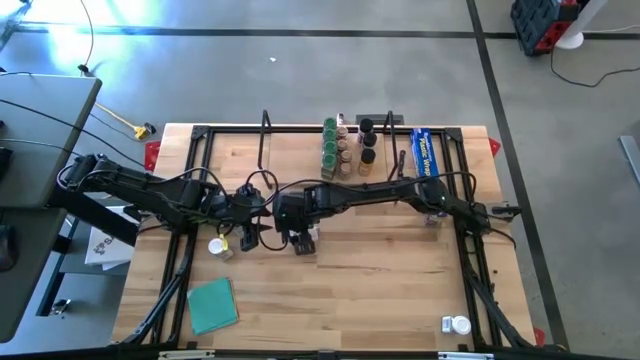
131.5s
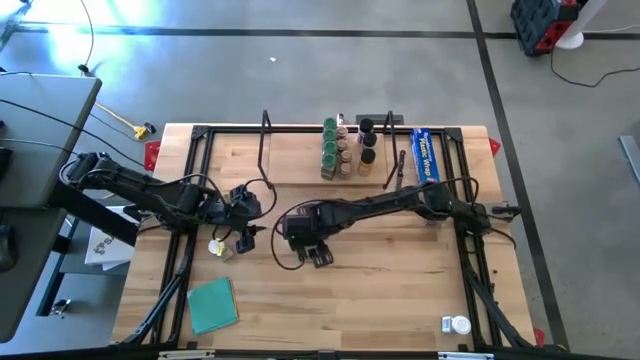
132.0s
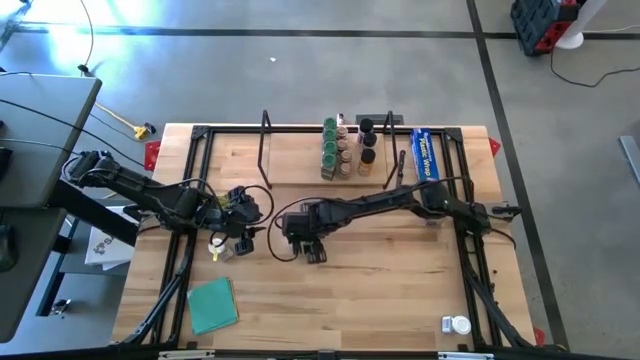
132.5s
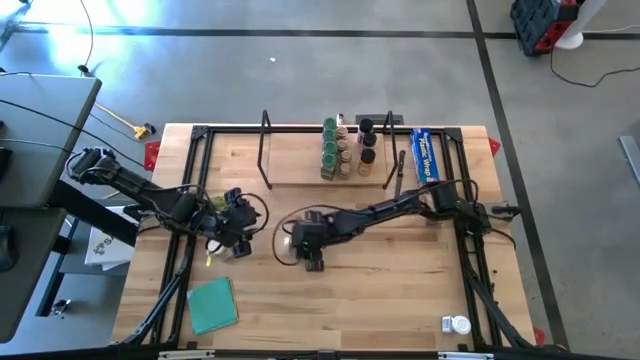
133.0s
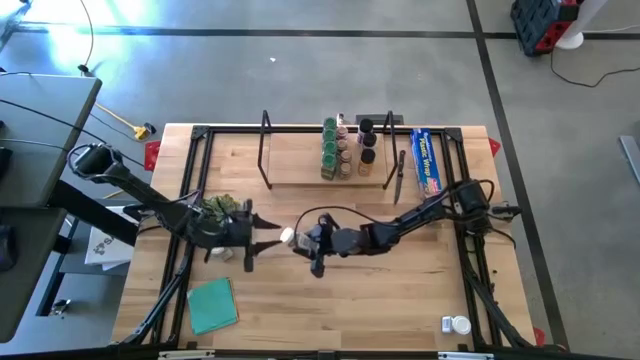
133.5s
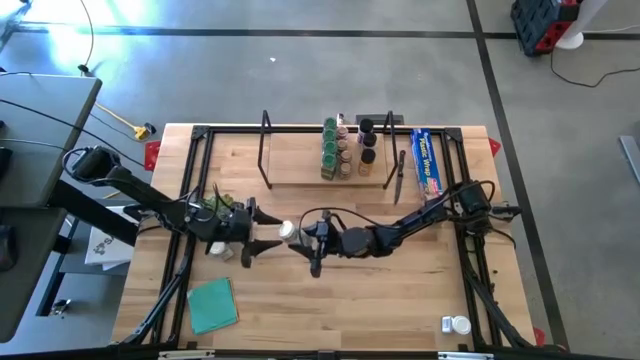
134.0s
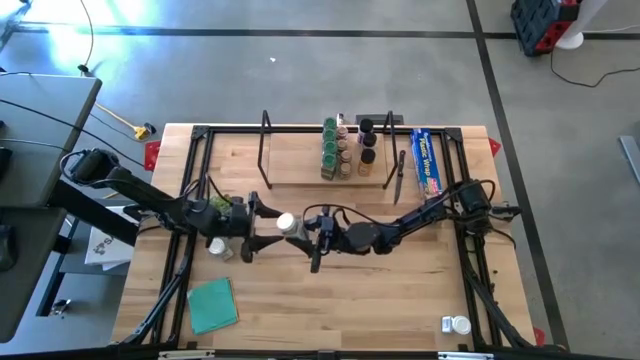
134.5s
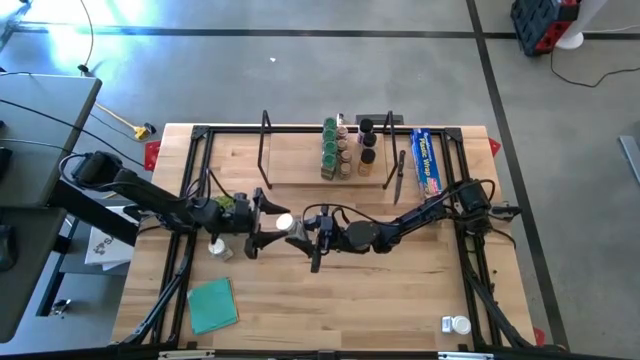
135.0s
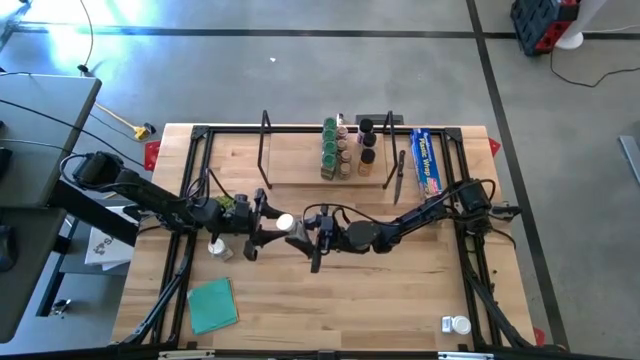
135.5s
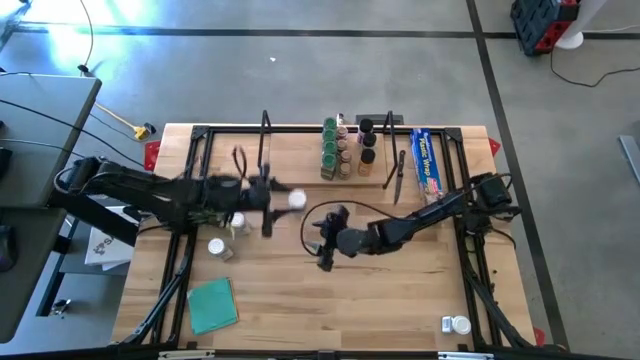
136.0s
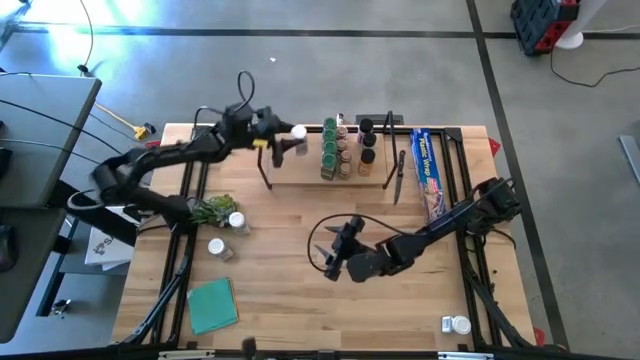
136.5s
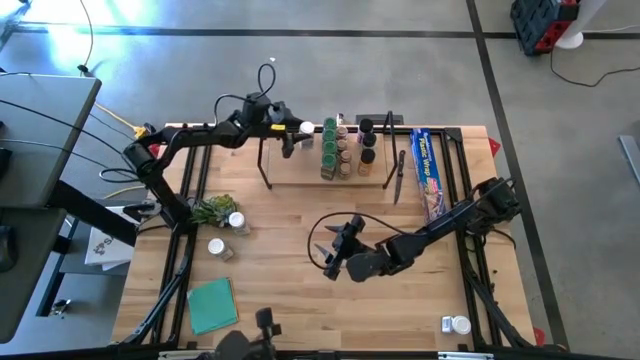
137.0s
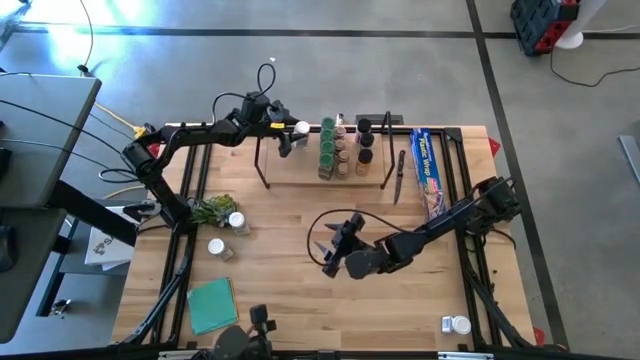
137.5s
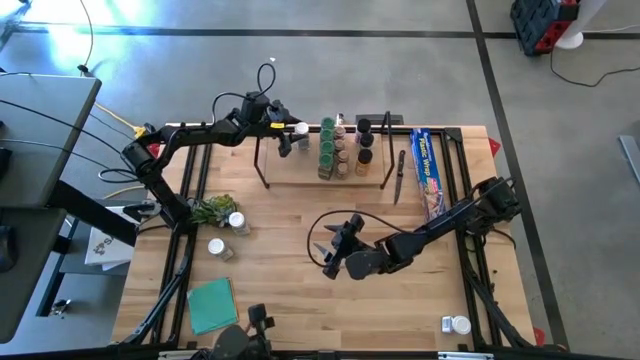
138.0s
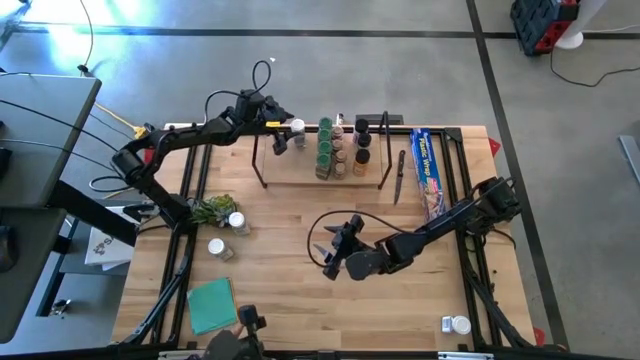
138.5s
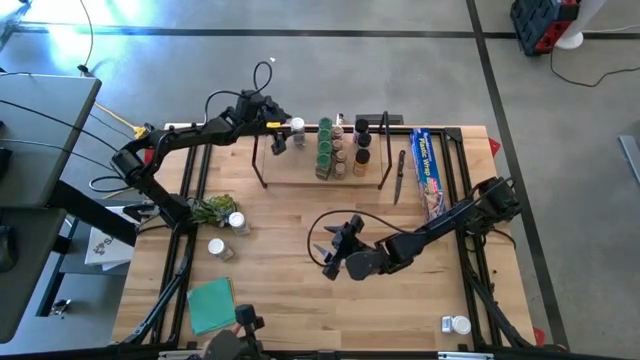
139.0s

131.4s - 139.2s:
Task: Shelf spices
Put the white seasoning bottle on the shelf

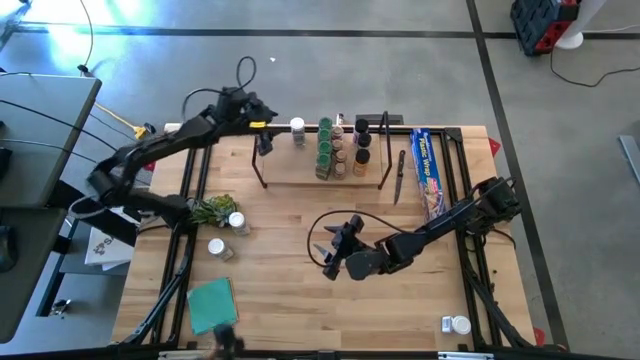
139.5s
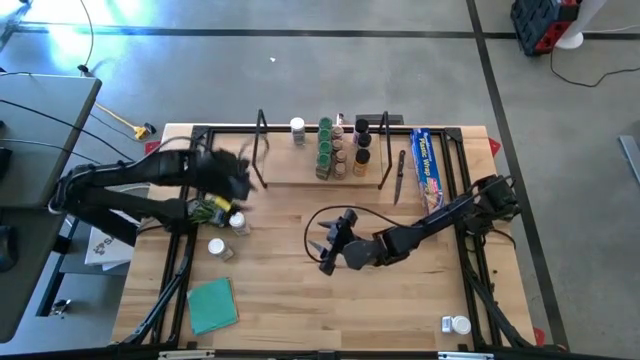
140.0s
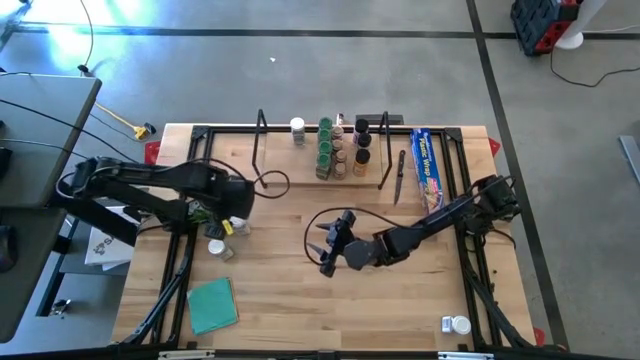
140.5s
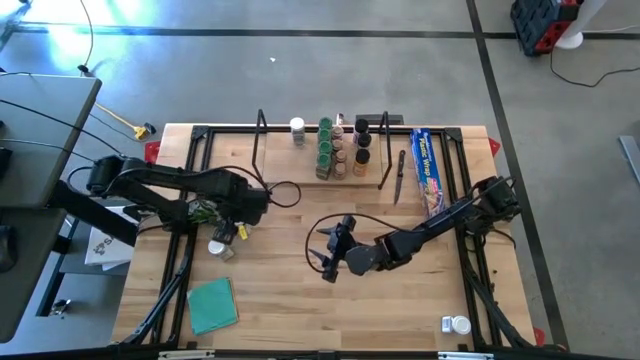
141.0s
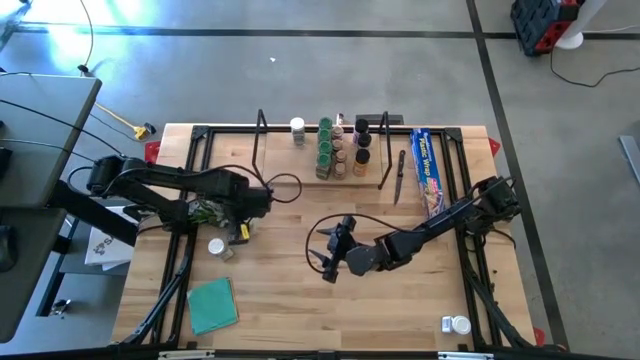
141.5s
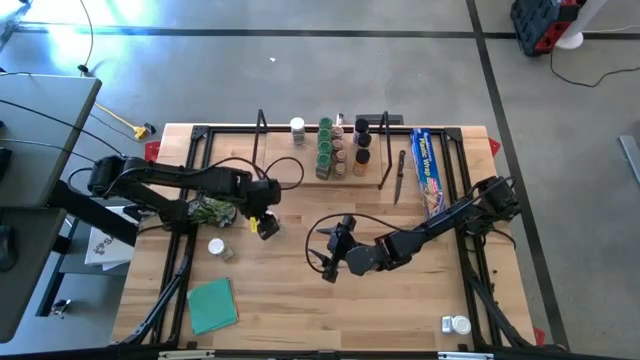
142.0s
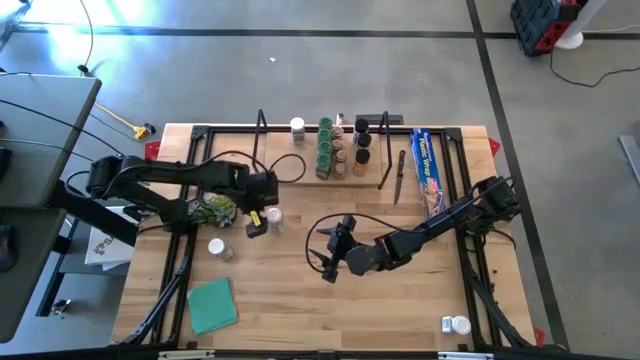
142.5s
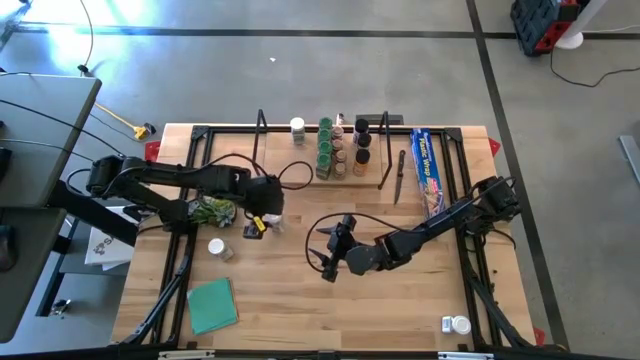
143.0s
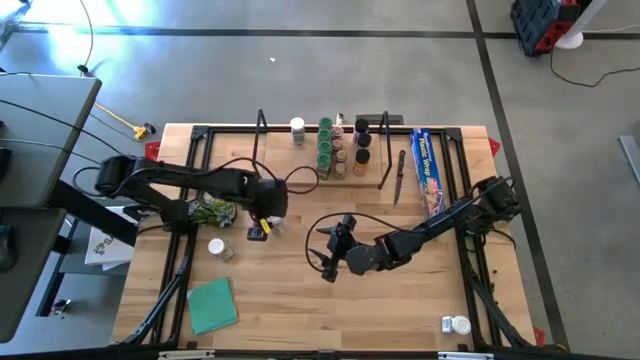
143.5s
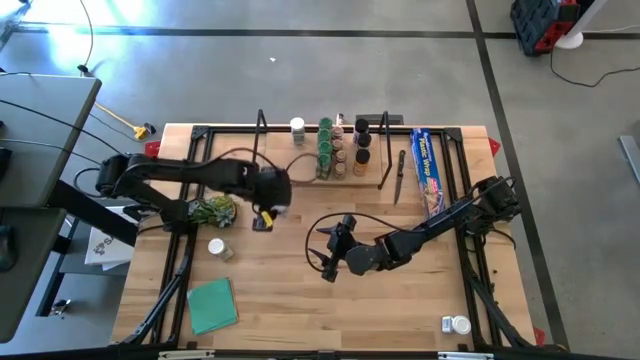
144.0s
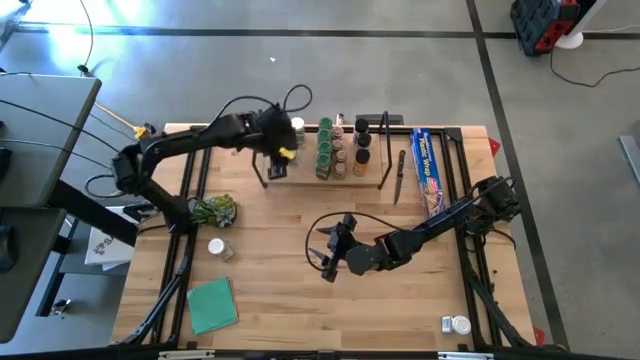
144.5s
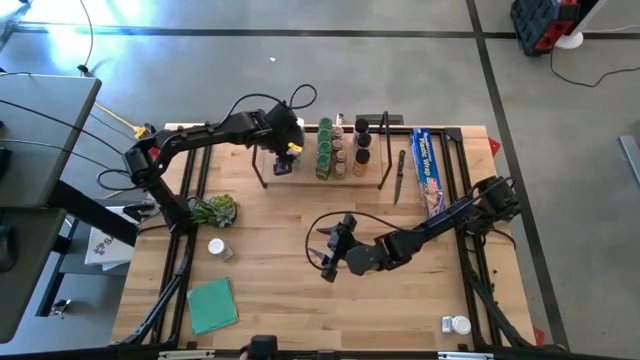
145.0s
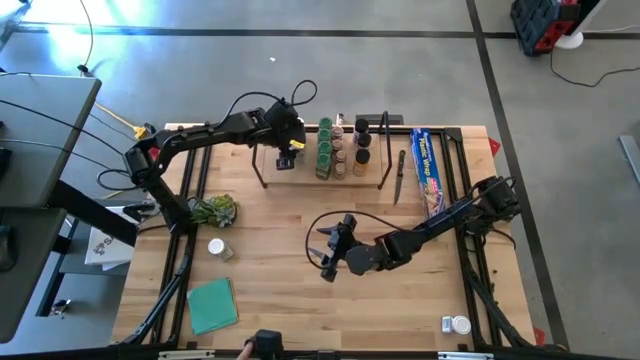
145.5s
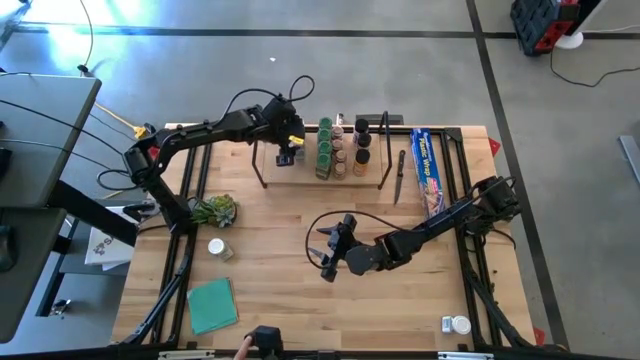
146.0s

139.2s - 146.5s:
Put the white seasoning bottle on the shelf align with the other white seasoning bottle

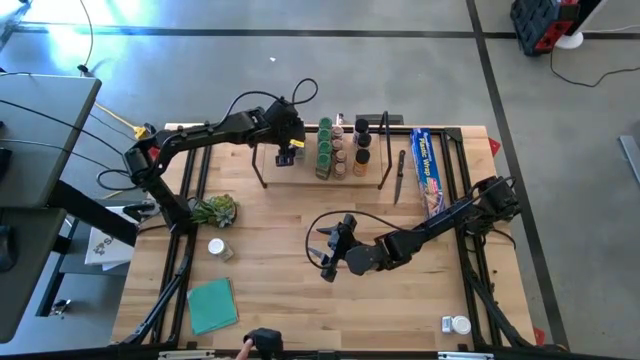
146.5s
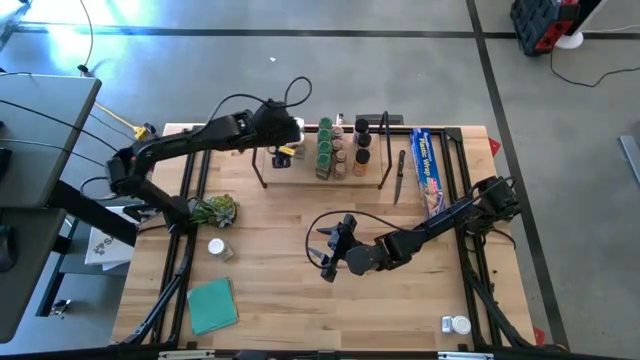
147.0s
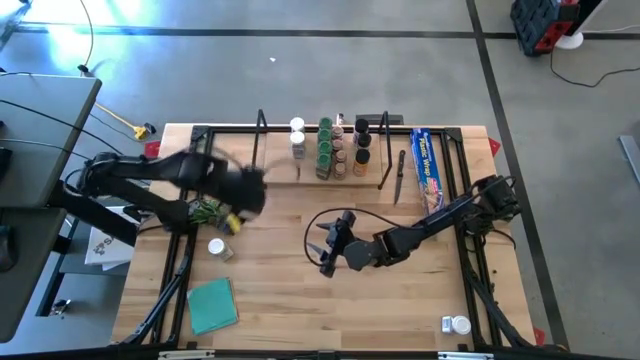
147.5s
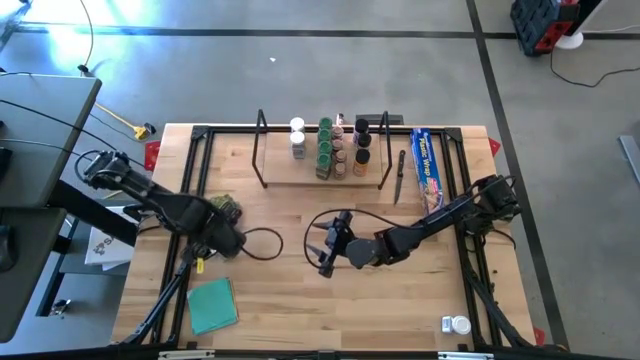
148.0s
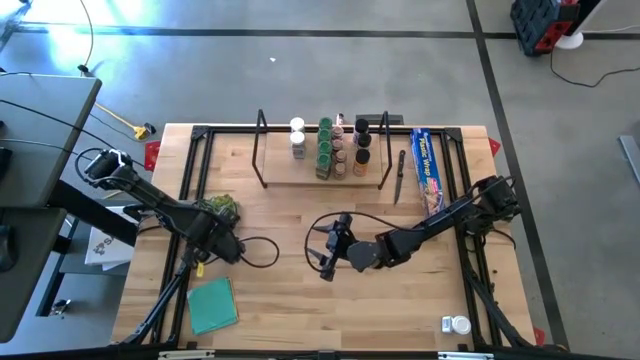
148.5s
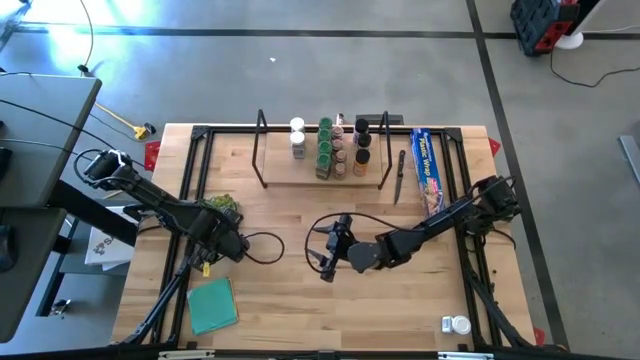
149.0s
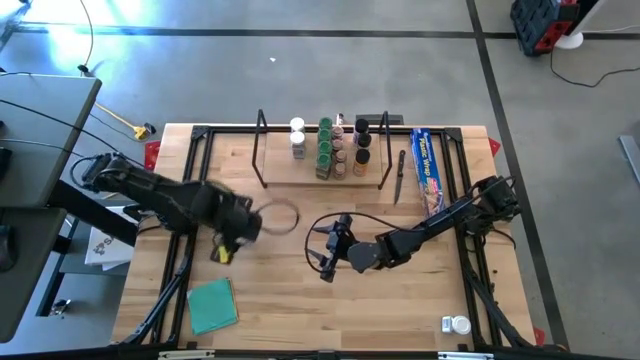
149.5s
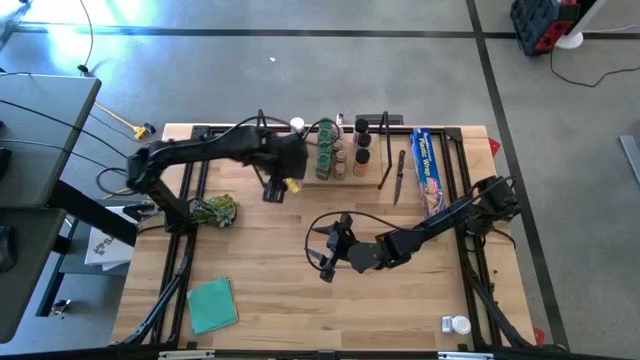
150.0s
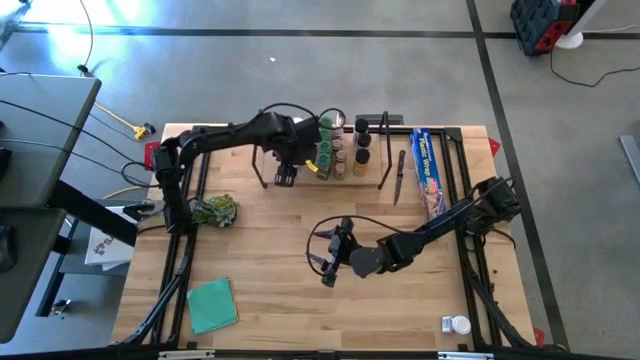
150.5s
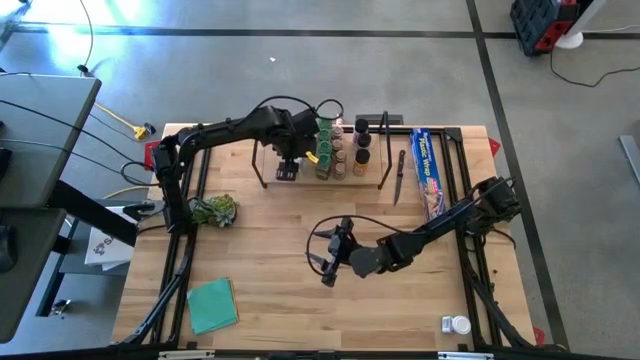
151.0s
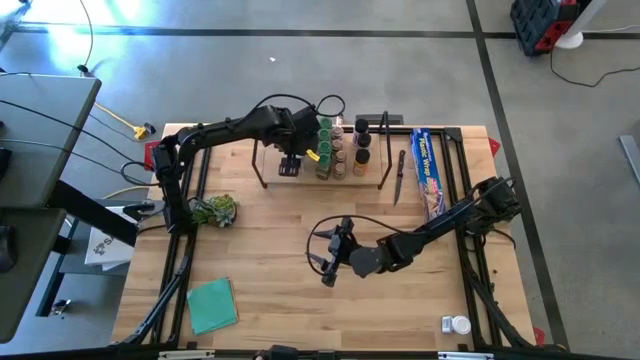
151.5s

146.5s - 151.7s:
Put the white seasoning bottle on the shelf align with the other white seasoning bottle
